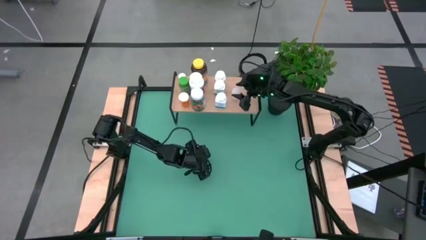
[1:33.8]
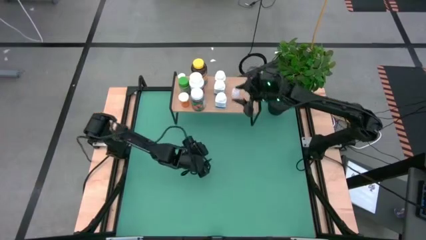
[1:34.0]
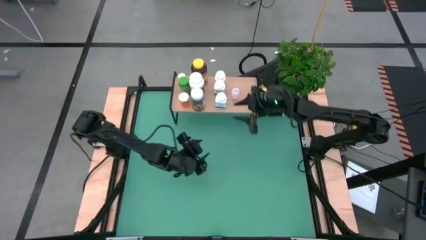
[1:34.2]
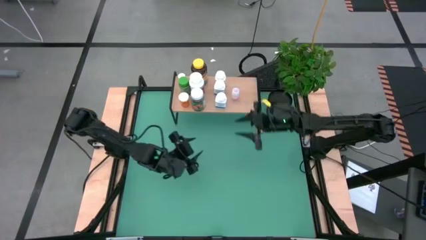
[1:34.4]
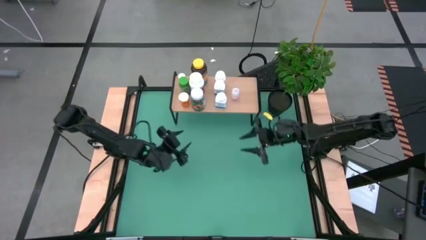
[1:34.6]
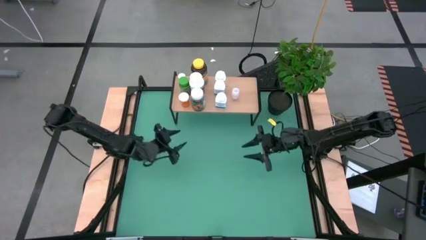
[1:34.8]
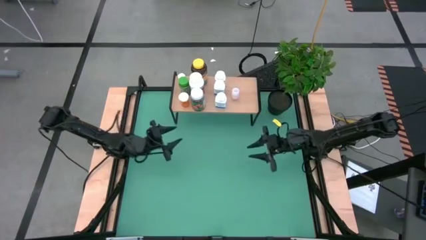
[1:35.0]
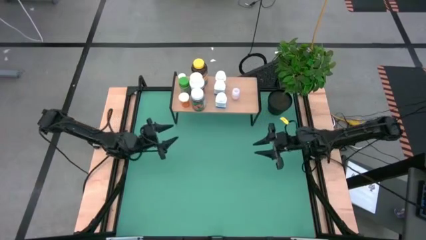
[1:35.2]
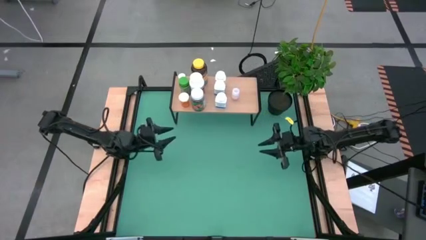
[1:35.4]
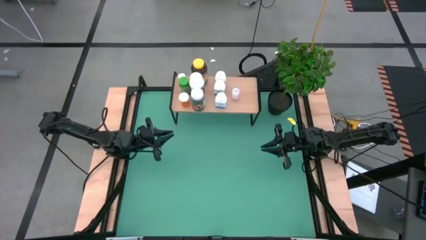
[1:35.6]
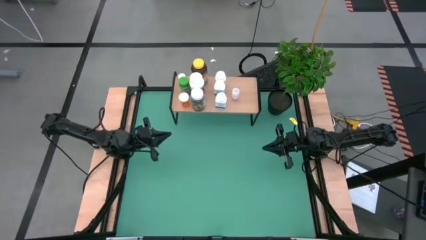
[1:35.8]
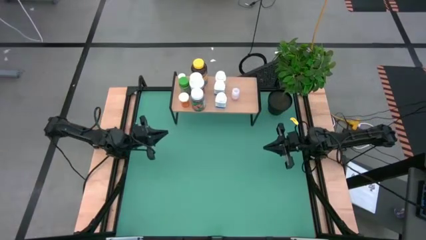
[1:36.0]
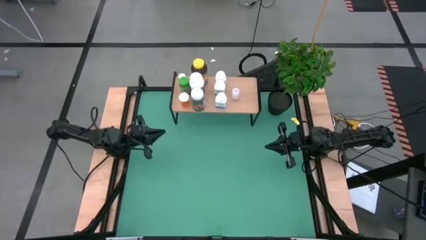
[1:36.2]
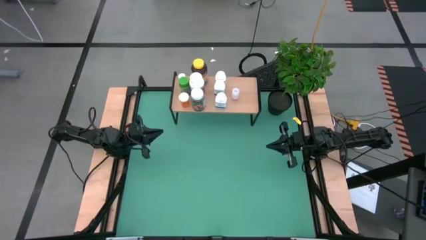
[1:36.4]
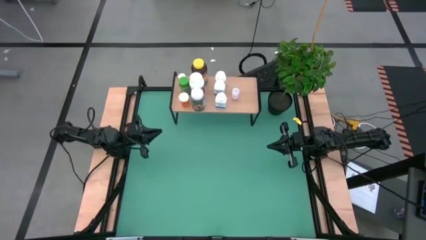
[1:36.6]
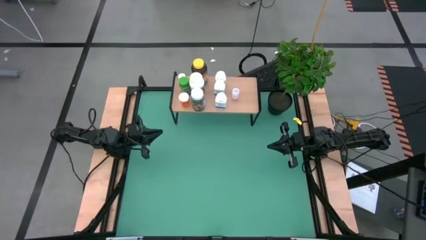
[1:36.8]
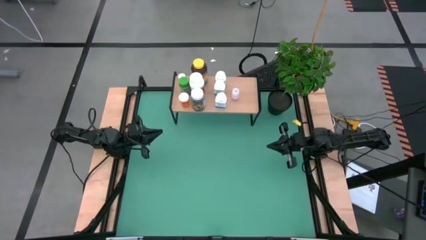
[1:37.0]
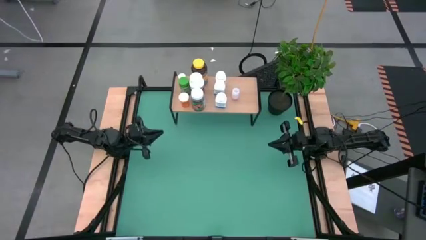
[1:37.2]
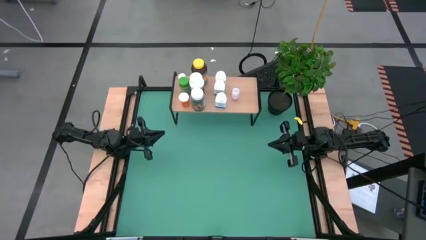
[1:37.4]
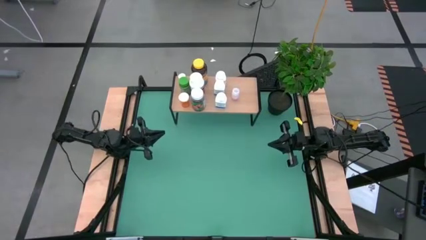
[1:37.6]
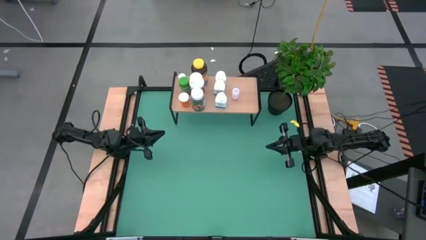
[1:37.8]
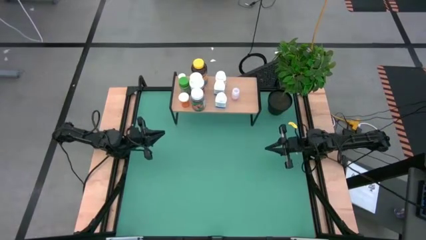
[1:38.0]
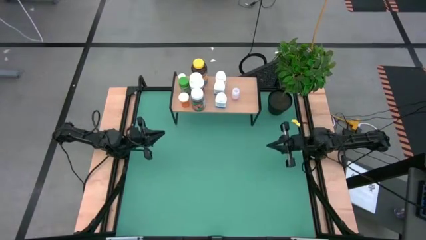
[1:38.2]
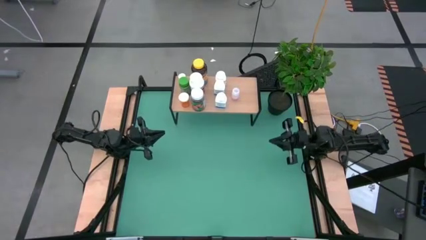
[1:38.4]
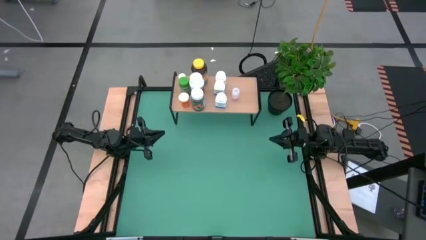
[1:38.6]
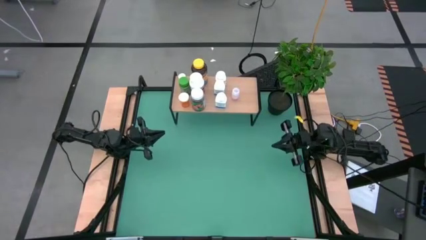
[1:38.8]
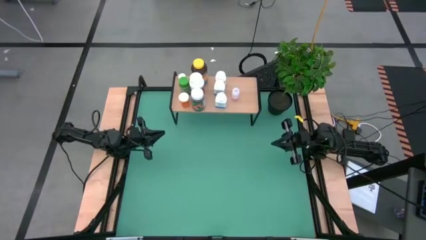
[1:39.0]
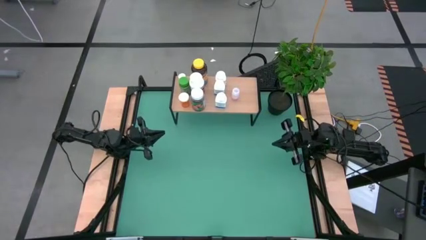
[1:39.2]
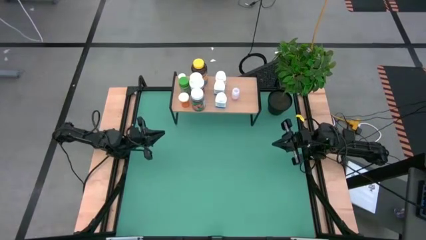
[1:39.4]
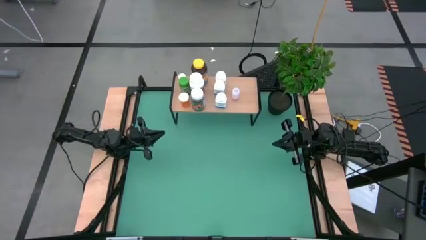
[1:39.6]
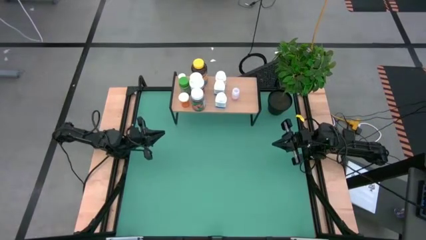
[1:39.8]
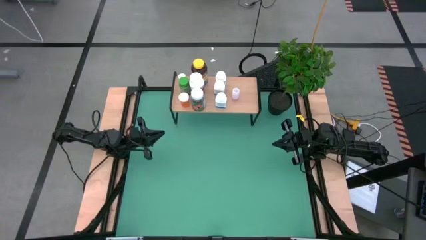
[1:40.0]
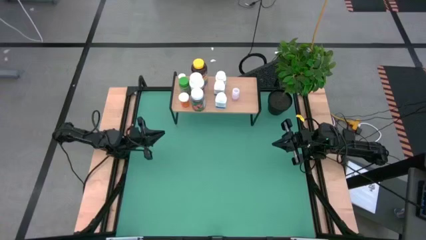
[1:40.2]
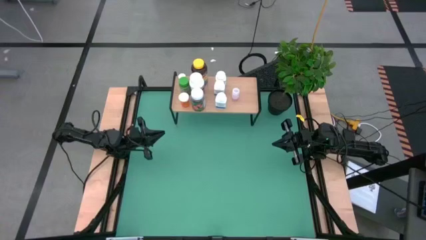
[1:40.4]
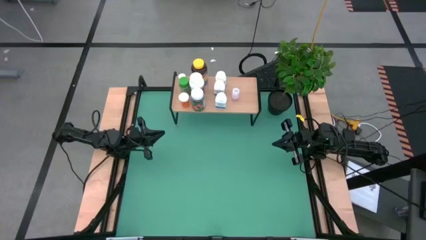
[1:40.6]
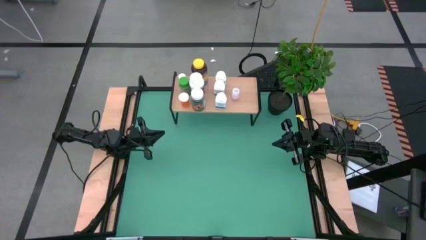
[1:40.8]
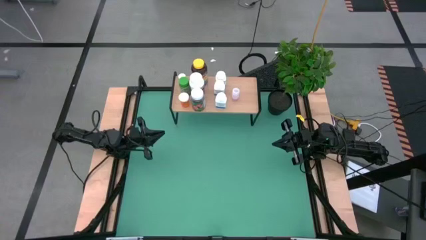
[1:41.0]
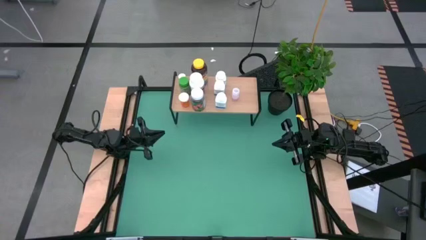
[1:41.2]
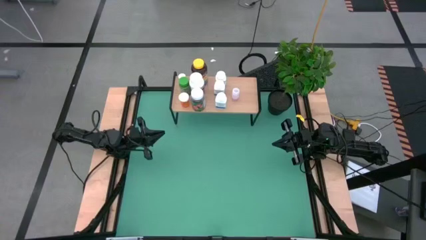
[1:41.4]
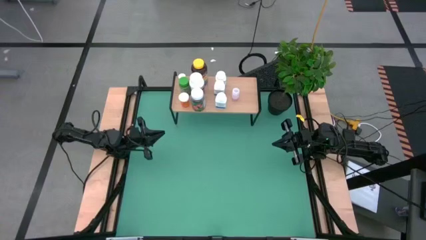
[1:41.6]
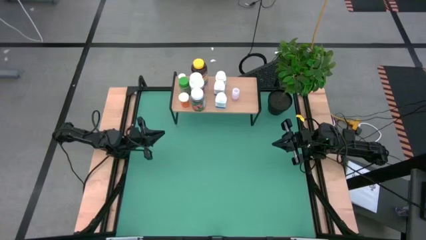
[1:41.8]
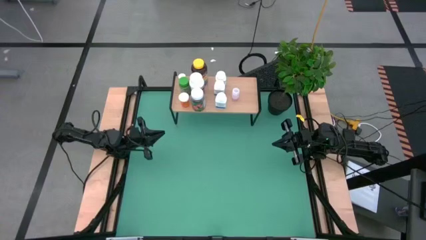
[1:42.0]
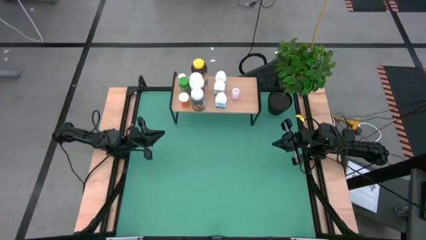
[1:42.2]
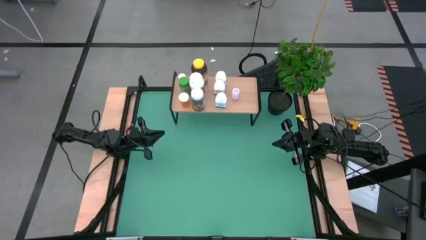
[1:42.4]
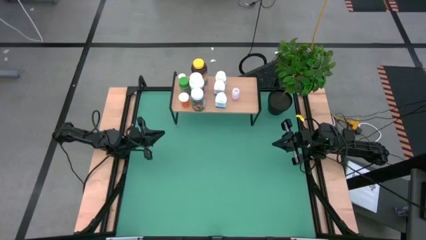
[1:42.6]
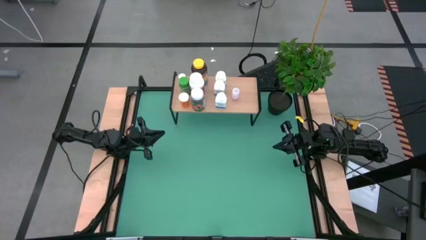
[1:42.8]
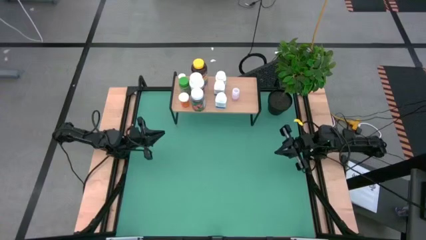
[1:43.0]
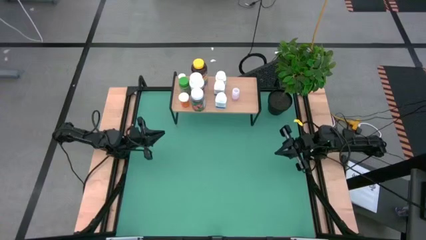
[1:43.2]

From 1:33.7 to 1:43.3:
Task: Pick and place medicine bottles onto shelf by color
Return to Home Position

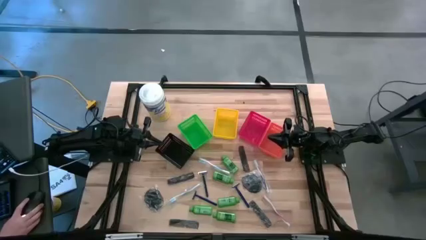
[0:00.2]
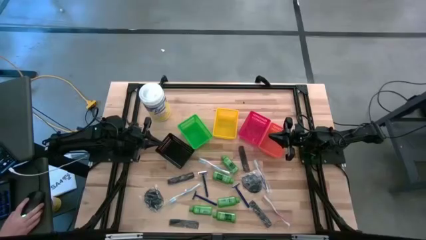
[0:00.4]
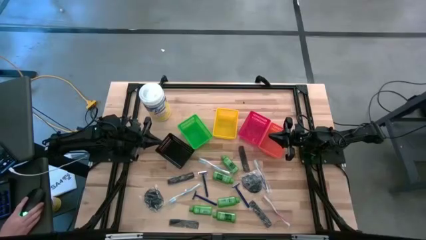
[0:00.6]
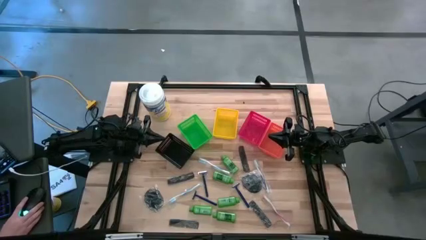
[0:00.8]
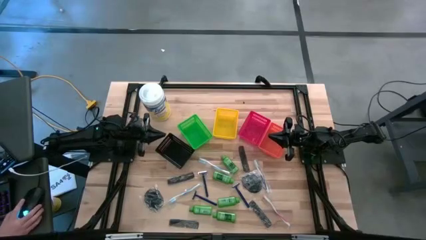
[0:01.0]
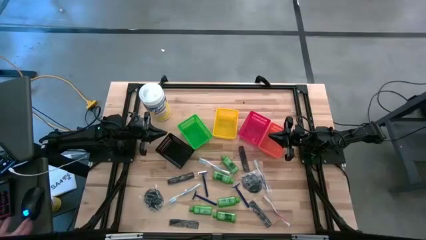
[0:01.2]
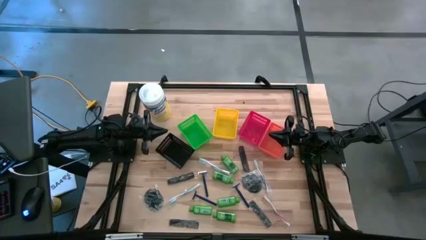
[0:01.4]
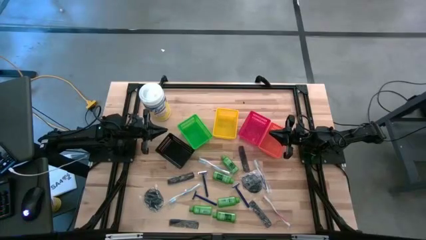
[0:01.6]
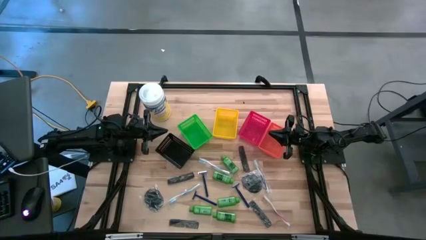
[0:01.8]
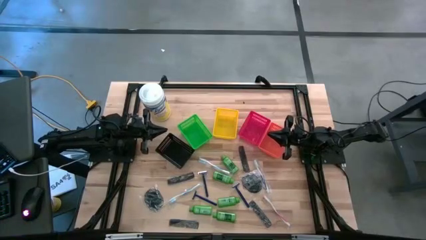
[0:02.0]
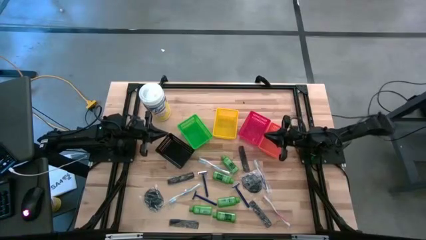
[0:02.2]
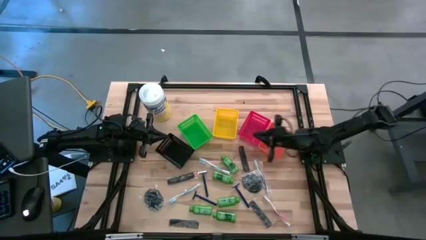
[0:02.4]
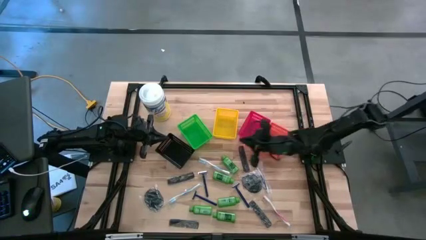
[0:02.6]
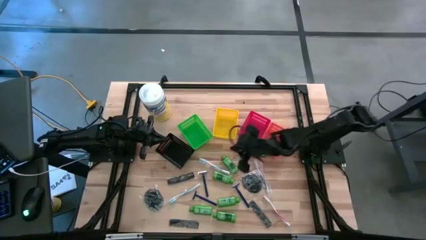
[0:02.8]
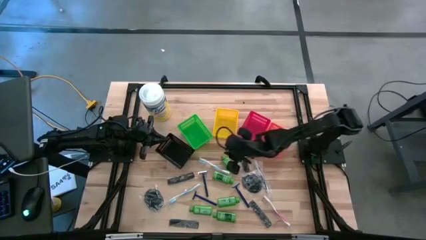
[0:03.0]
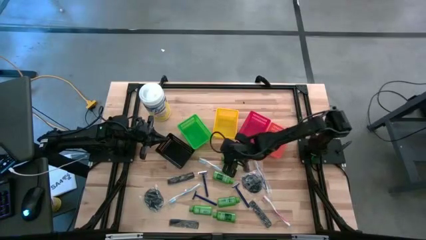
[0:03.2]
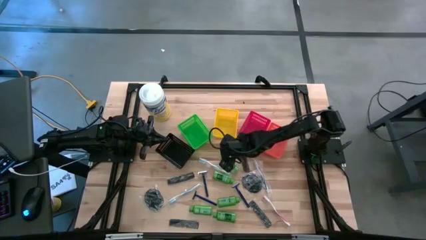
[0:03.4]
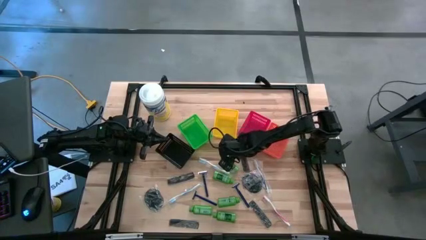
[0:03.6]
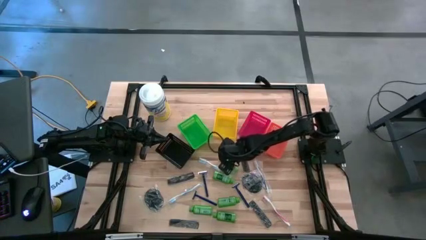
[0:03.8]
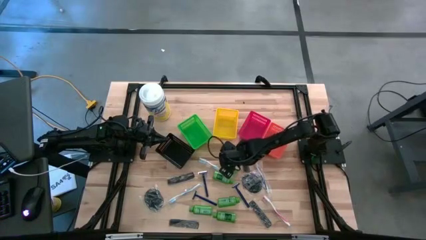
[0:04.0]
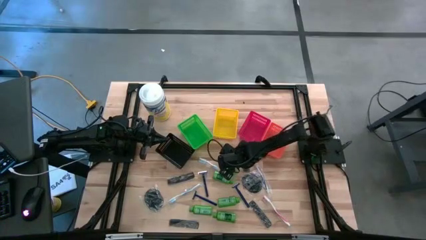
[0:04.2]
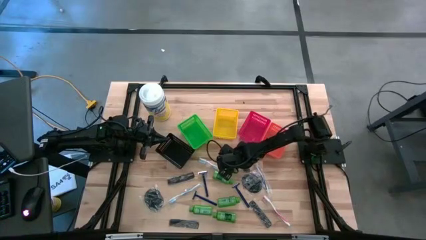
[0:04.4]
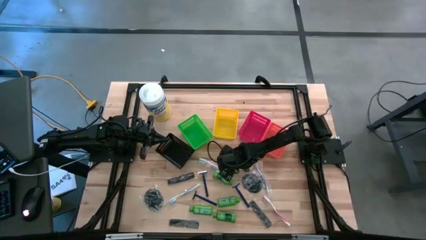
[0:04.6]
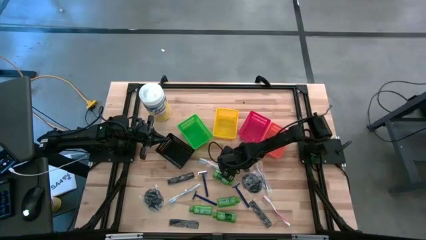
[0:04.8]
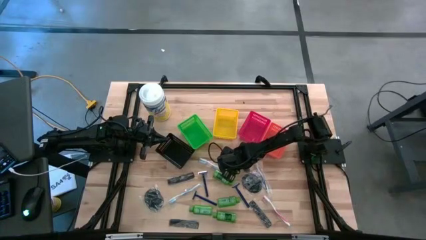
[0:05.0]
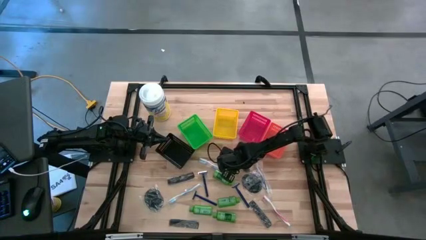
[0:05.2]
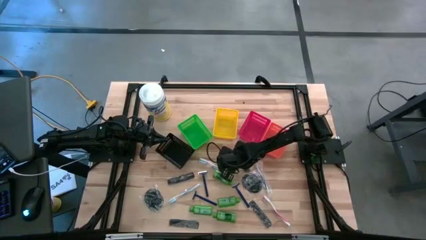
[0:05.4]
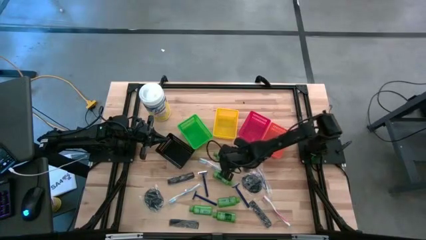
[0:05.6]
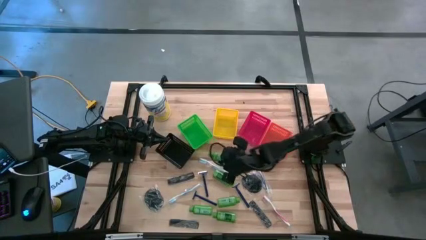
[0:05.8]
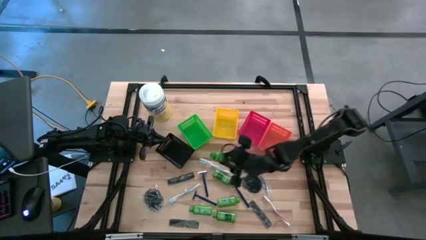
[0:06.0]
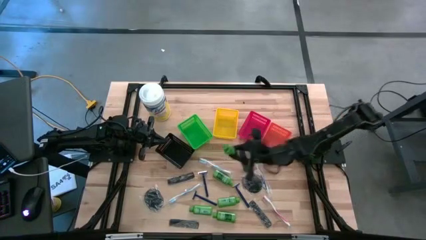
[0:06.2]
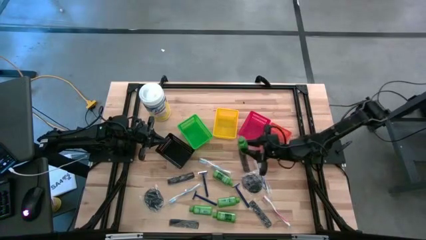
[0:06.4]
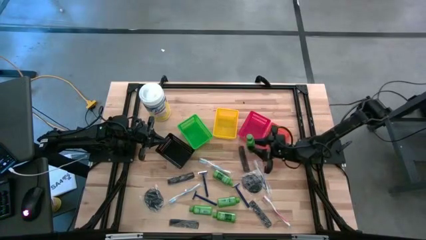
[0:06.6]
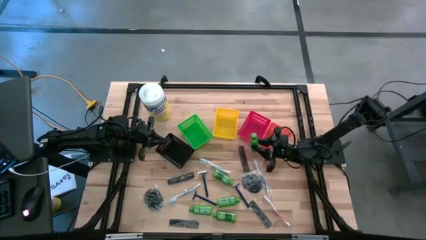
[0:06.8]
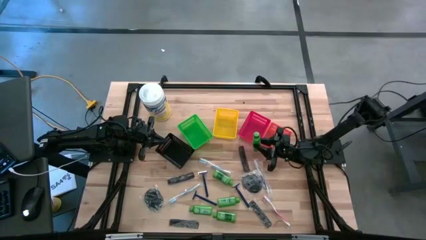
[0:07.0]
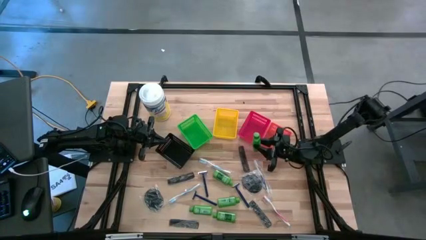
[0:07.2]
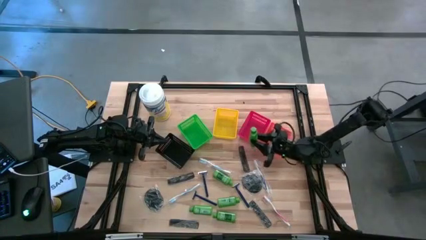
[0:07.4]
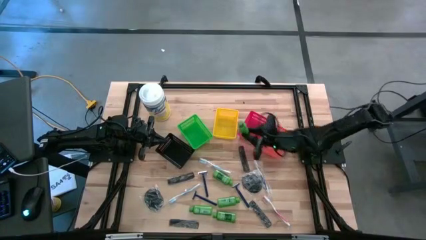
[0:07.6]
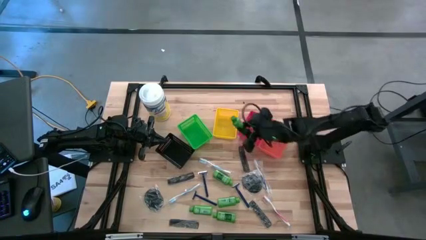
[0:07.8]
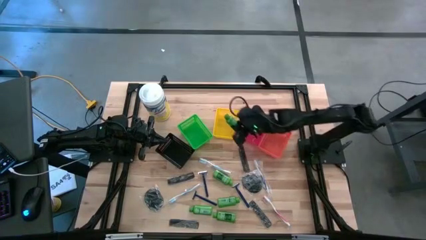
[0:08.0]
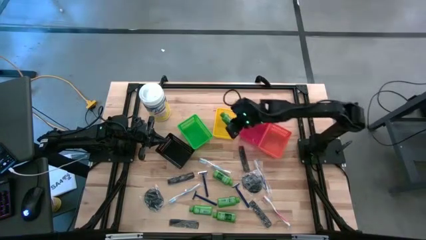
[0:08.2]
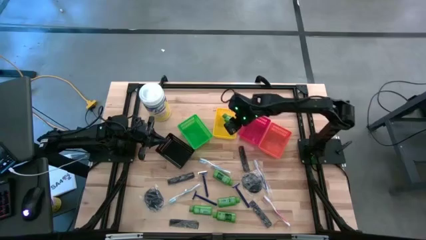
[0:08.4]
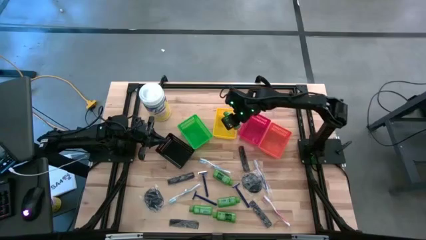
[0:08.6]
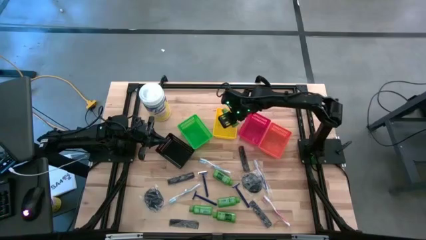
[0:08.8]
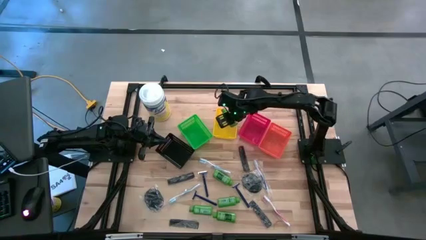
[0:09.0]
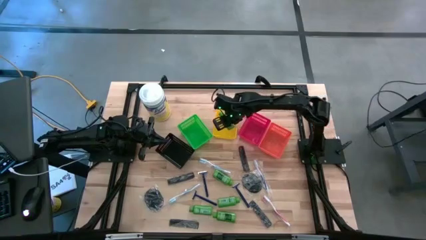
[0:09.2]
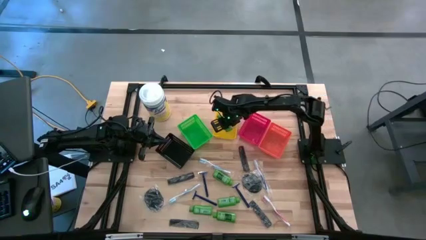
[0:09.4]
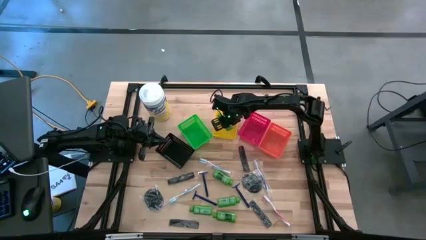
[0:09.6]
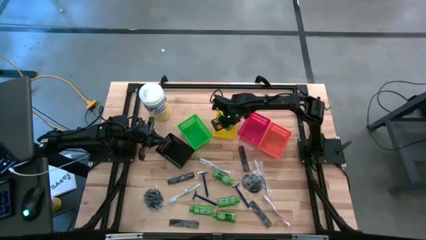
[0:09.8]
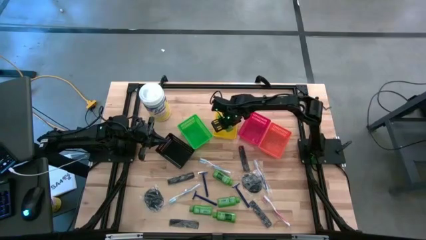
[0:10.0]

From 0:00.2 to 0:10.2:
Task: Pick & Place Travel size toiletries
Put the green shampoo into the yellow bin
